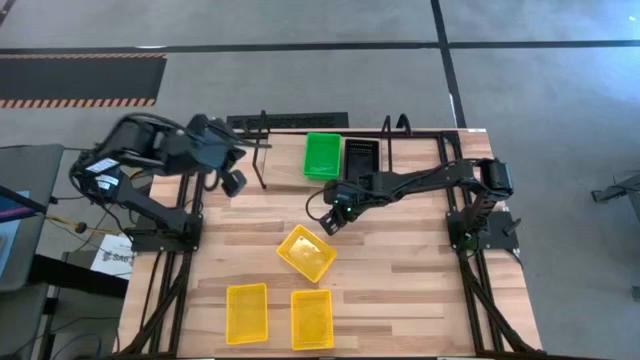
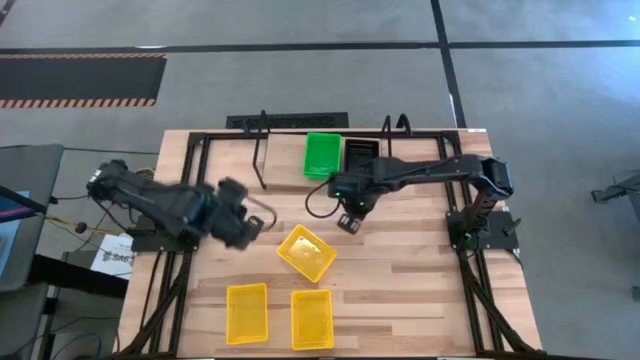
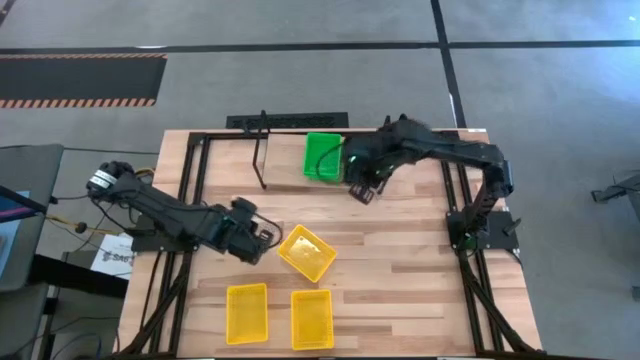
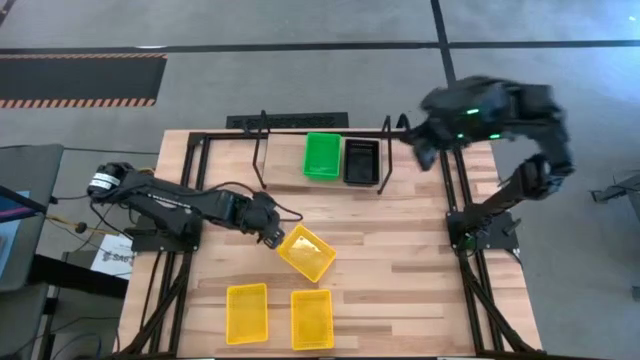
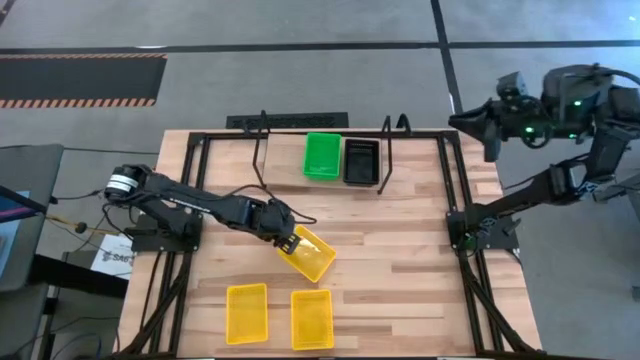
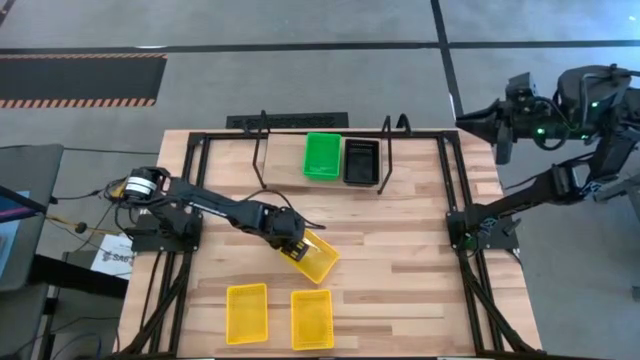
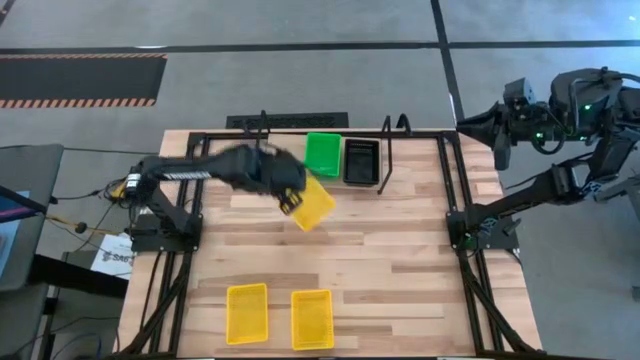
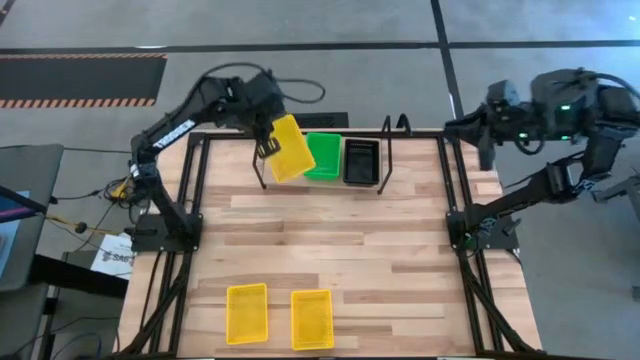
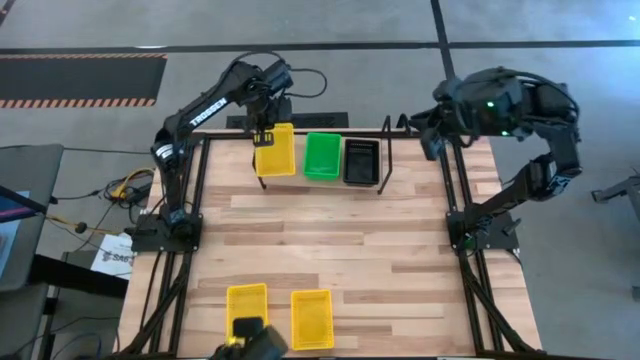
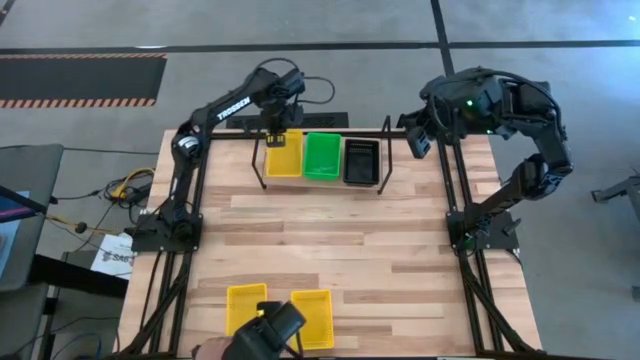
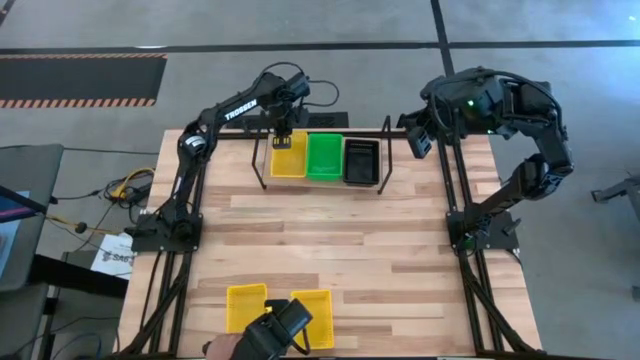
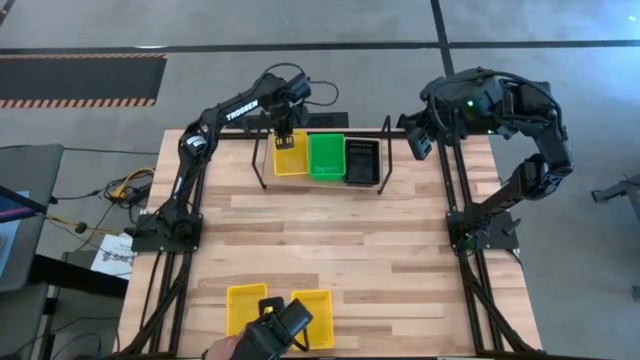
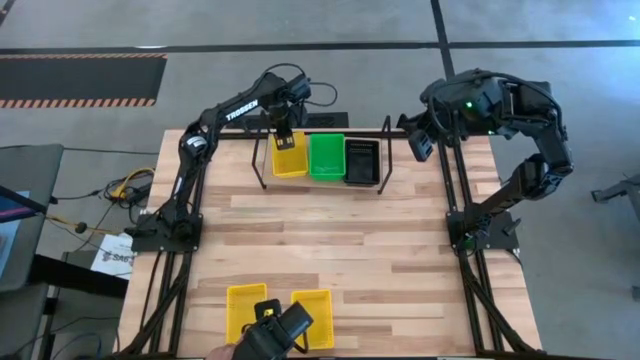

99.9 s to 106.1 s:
Task: Stack baskets on shelf by color
Put the top yellow container on the shelf beside the green container

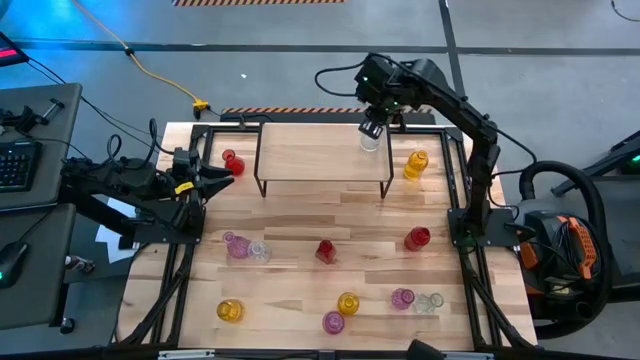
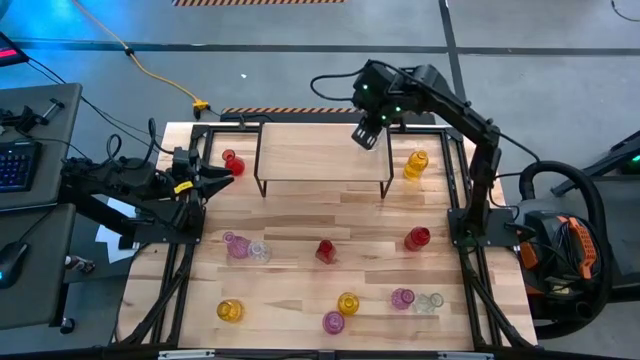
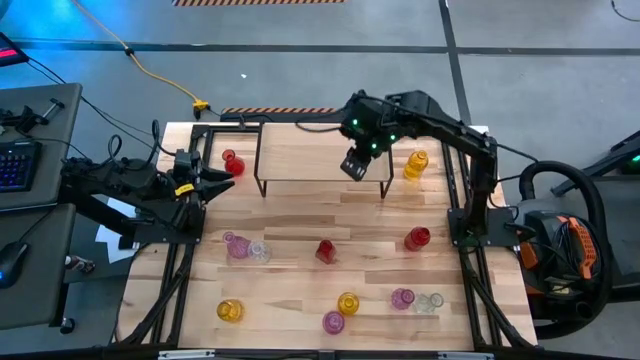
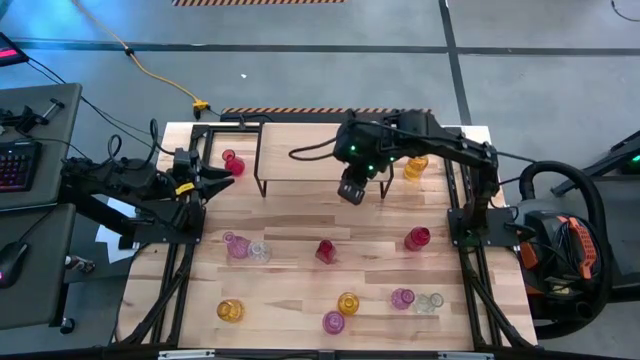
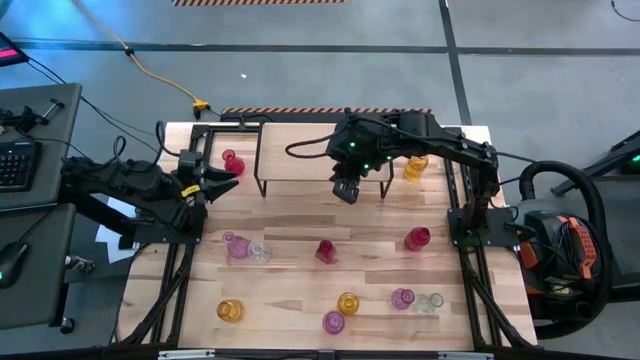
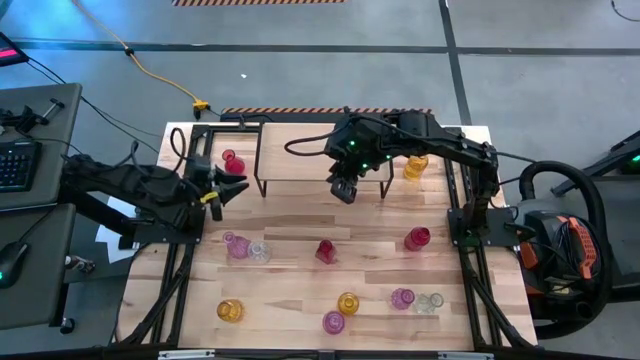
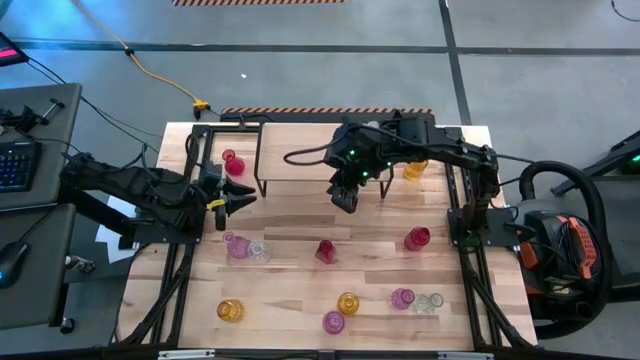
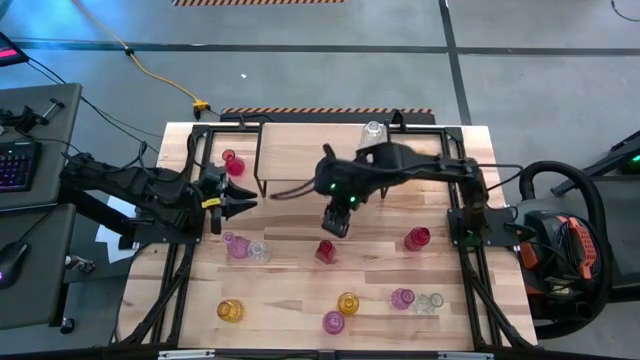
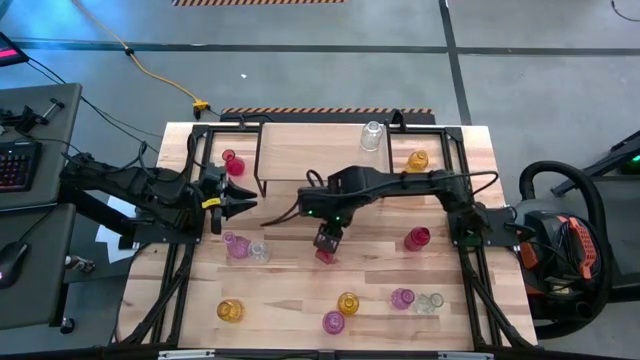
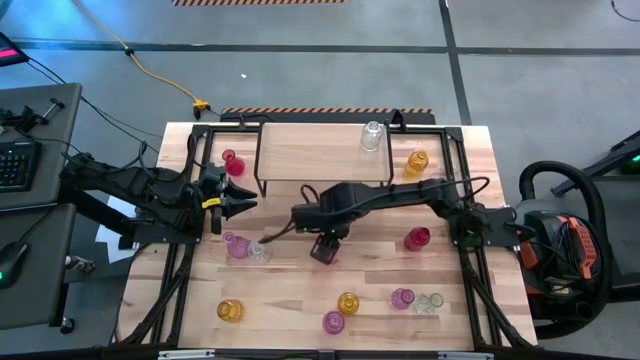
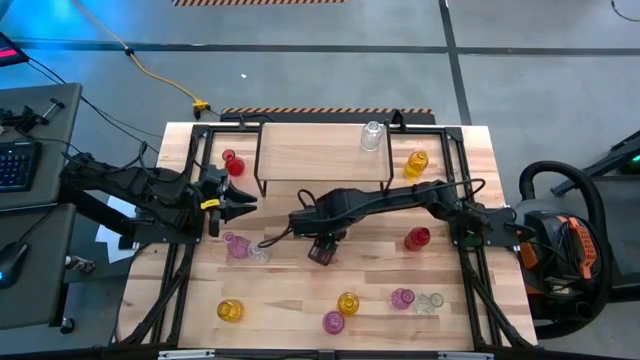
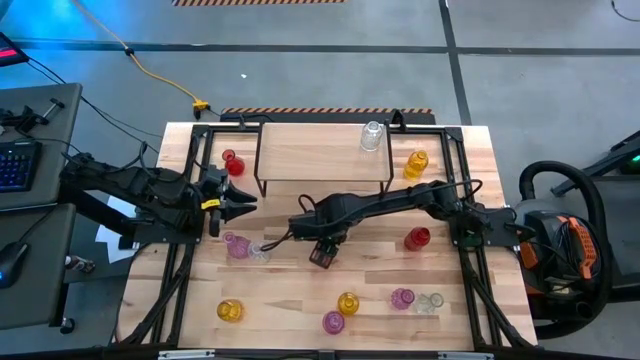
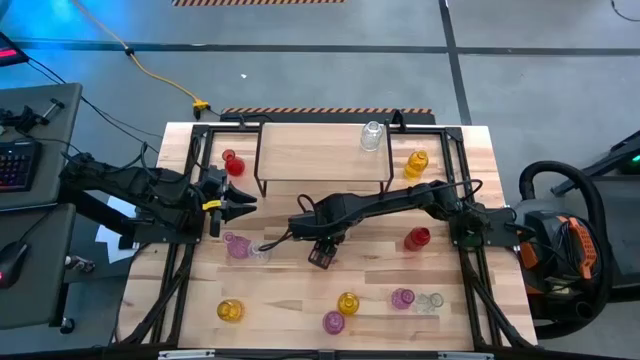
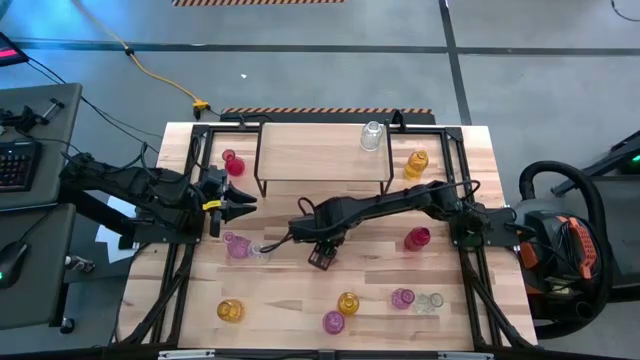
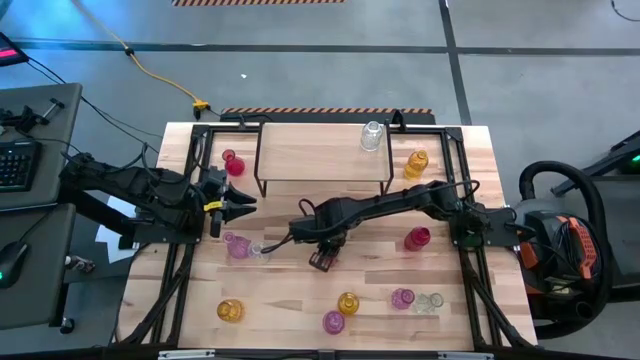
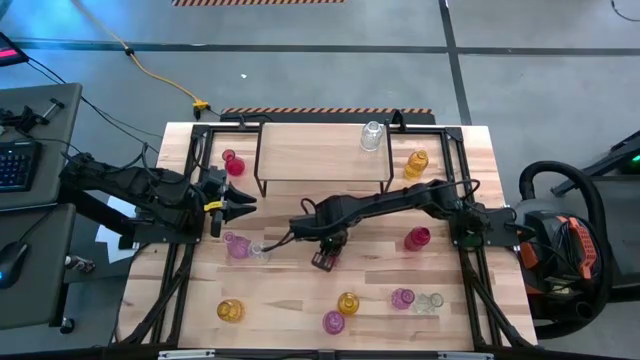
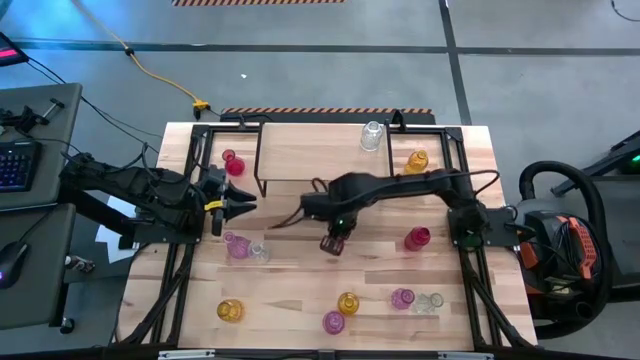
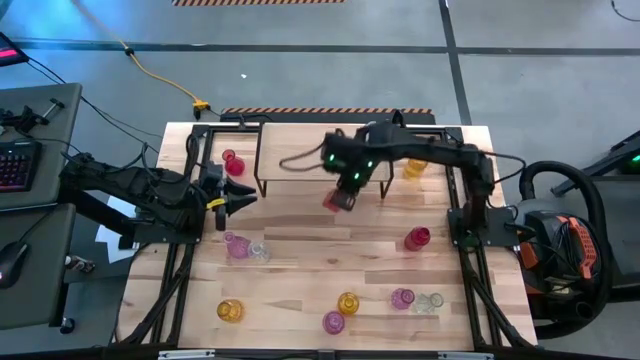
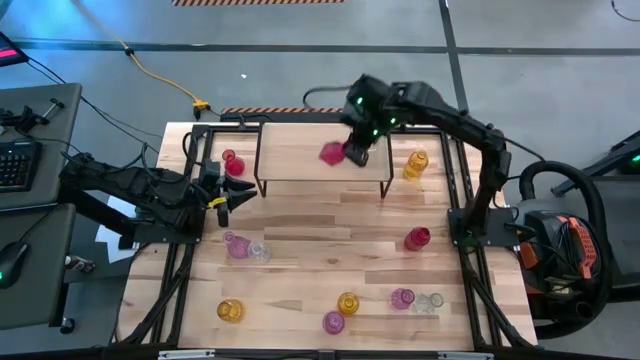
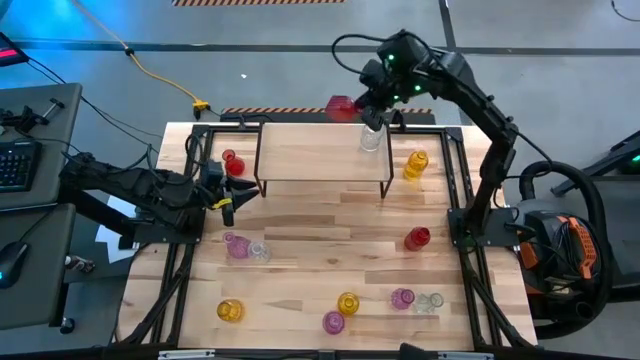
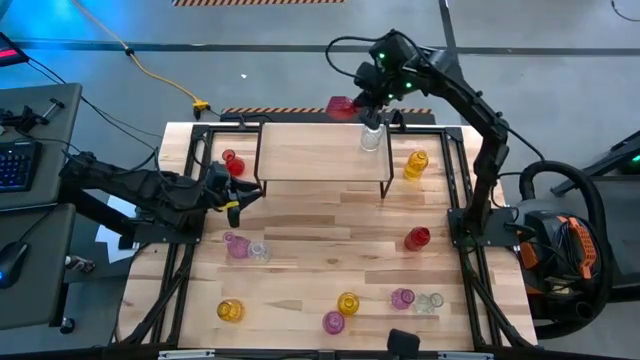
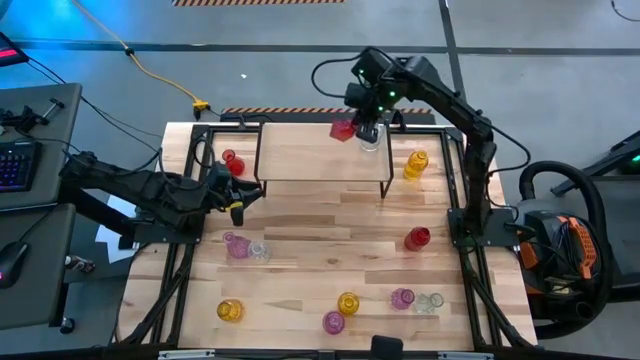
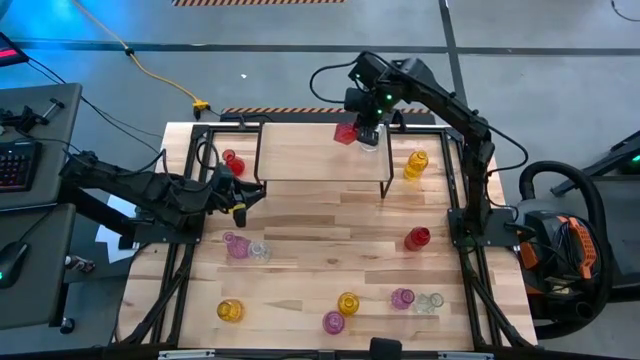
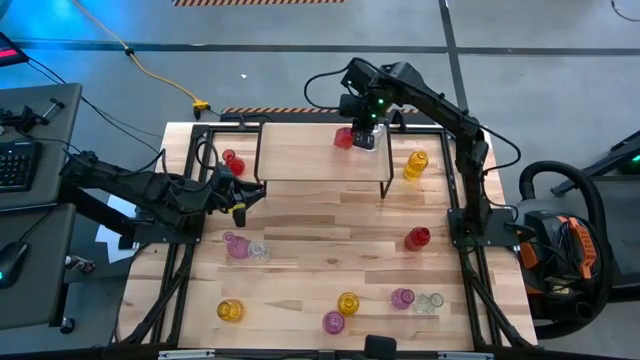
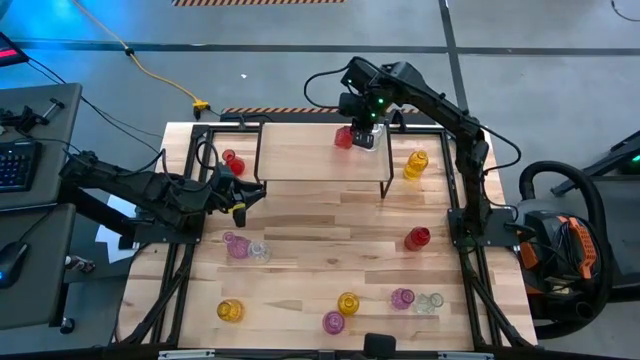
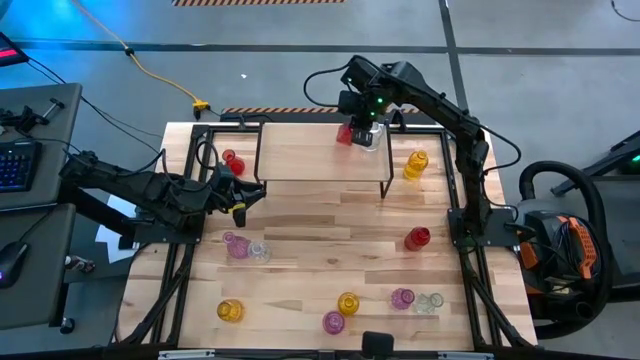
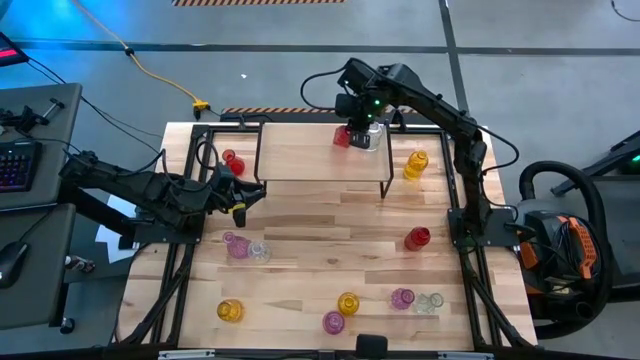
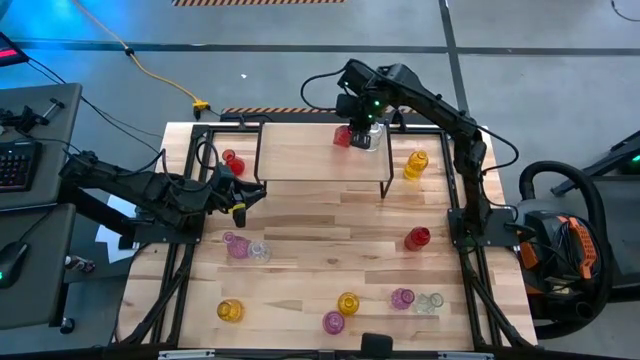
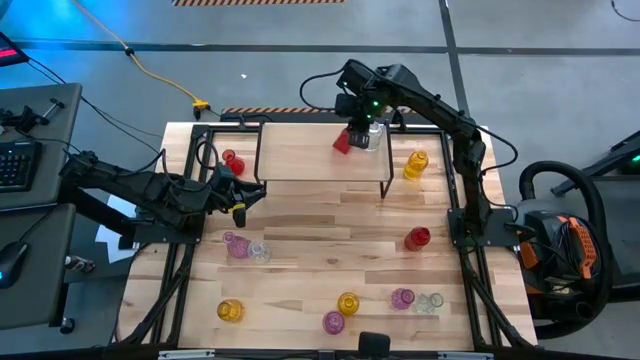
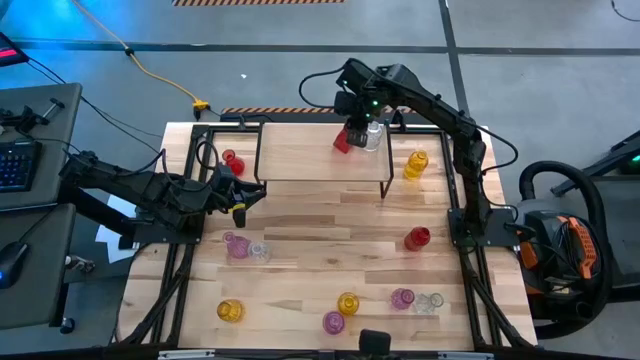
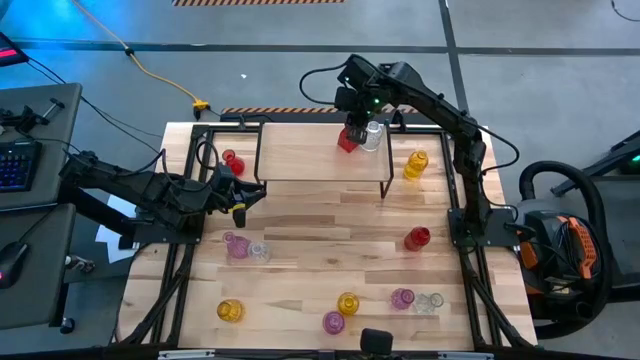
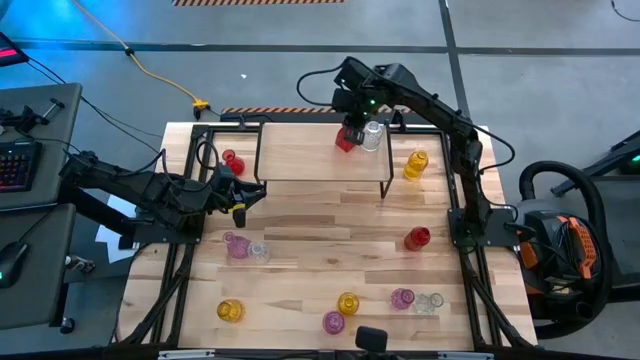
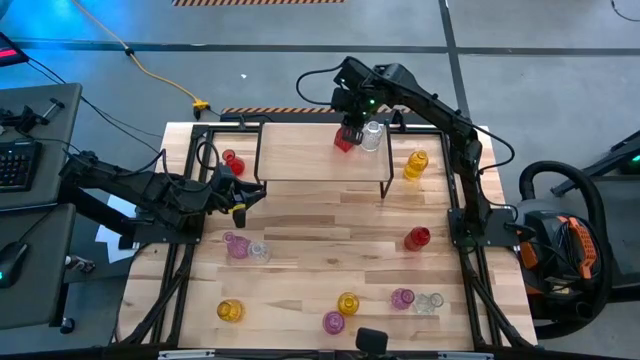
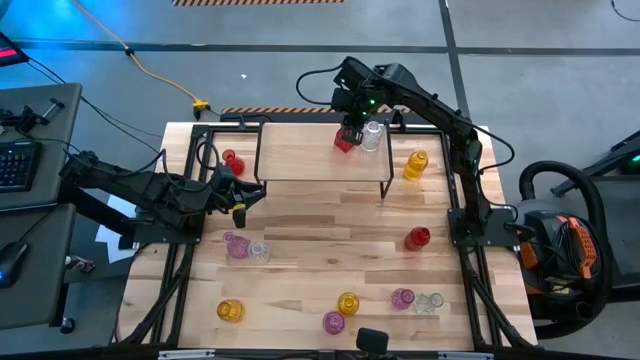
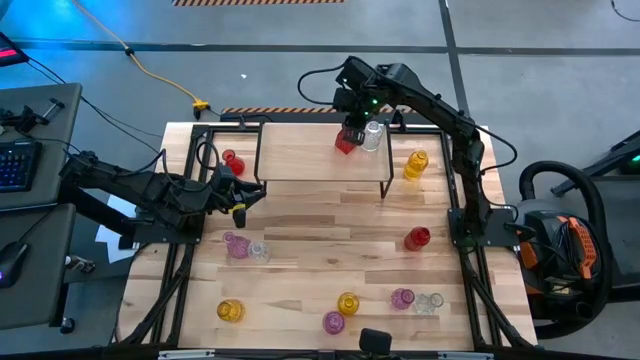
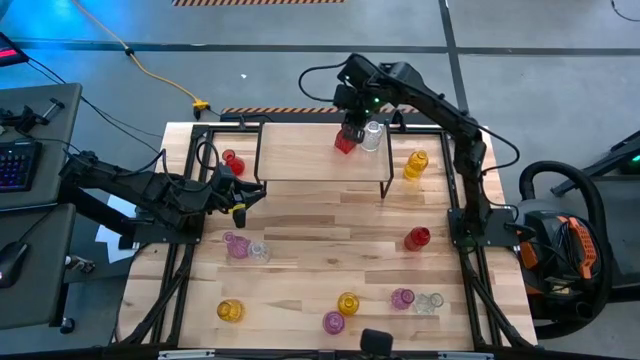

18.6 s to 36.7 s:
Task: sort vases onto shelf
Put the center red vase on the shelf
